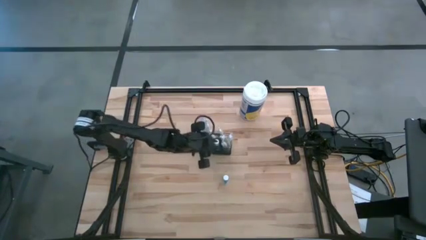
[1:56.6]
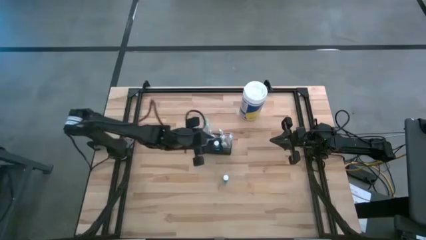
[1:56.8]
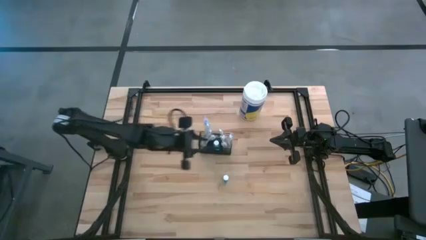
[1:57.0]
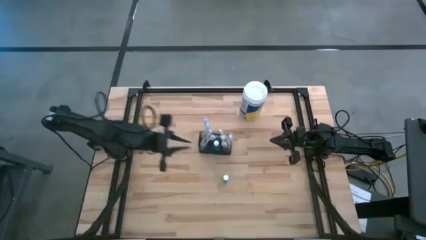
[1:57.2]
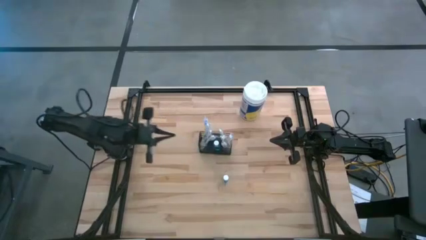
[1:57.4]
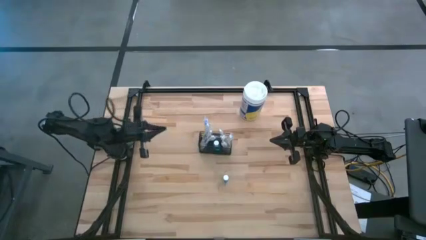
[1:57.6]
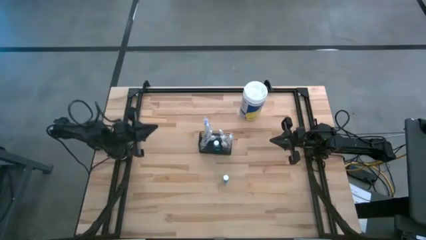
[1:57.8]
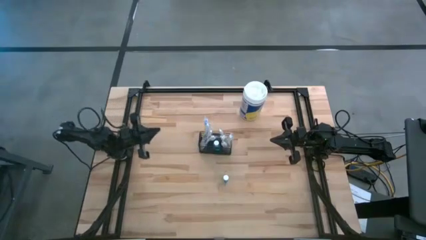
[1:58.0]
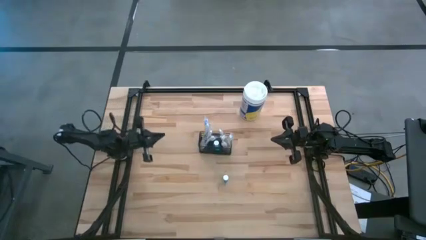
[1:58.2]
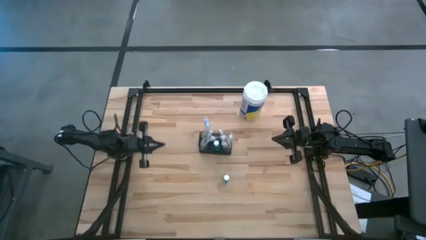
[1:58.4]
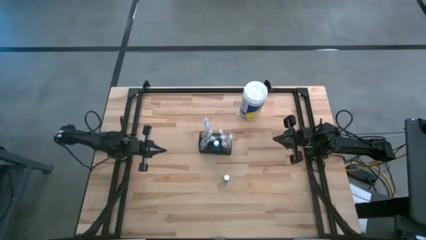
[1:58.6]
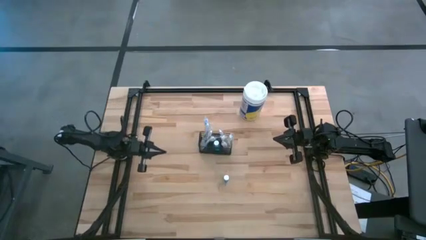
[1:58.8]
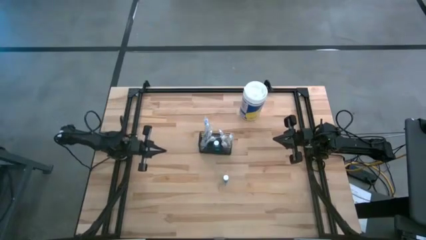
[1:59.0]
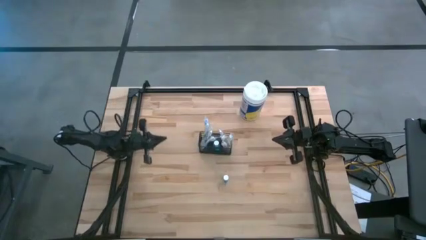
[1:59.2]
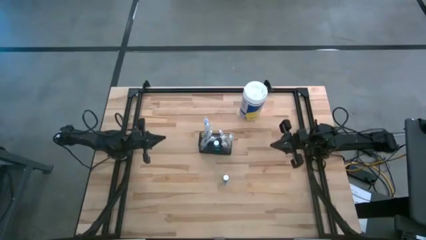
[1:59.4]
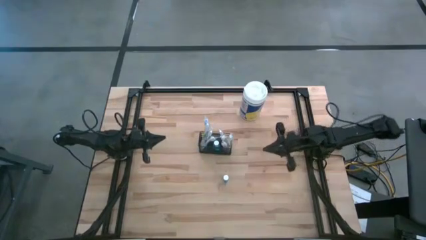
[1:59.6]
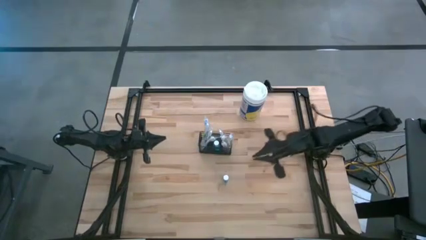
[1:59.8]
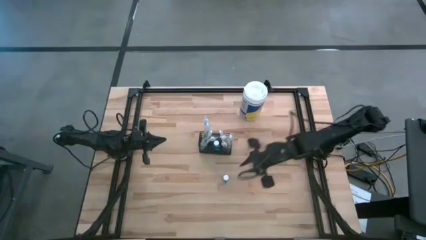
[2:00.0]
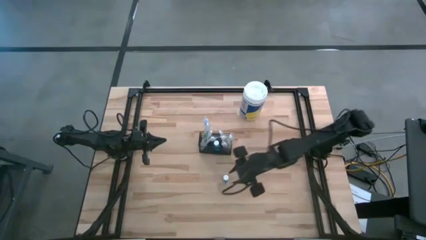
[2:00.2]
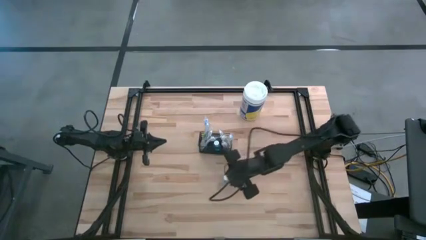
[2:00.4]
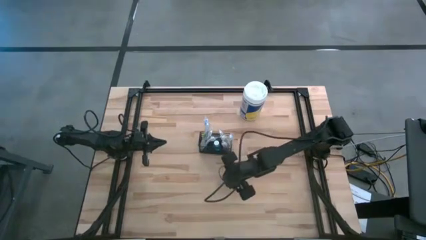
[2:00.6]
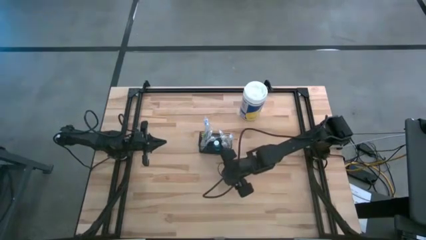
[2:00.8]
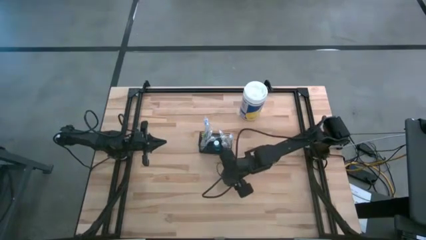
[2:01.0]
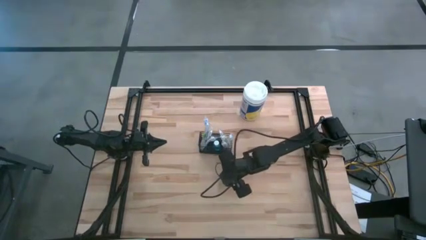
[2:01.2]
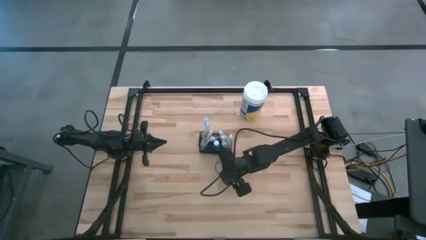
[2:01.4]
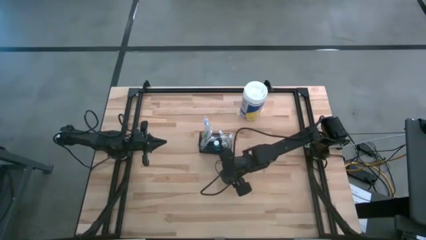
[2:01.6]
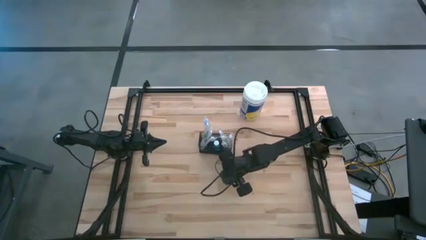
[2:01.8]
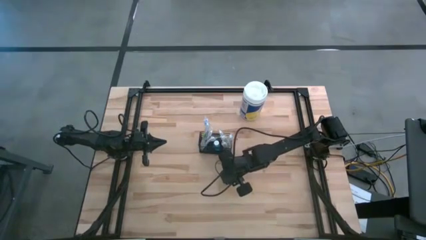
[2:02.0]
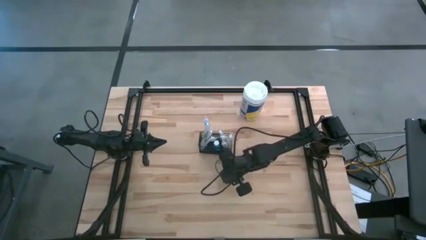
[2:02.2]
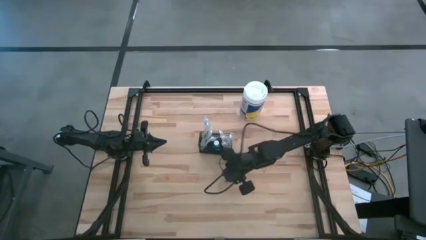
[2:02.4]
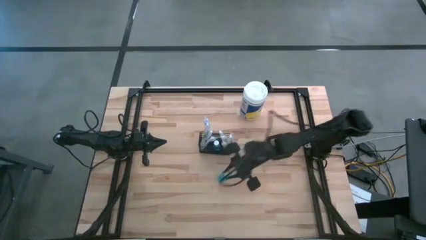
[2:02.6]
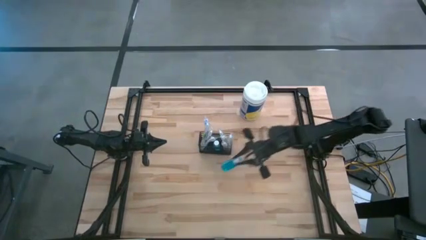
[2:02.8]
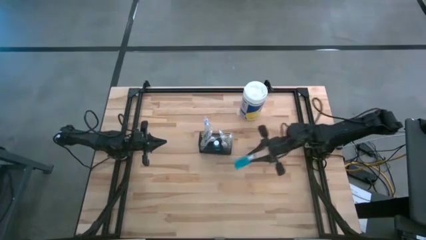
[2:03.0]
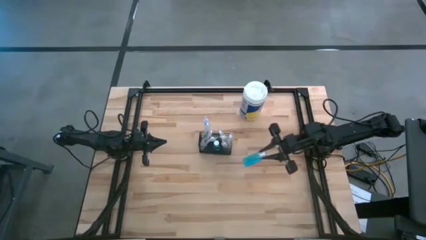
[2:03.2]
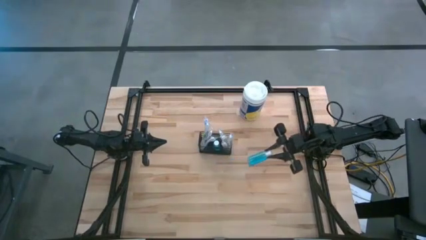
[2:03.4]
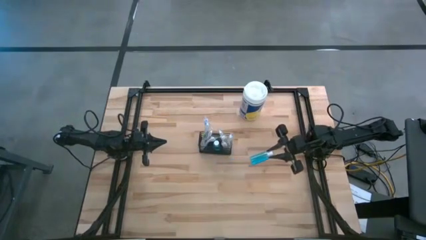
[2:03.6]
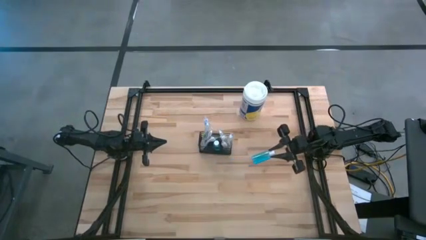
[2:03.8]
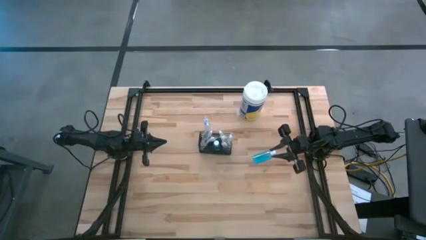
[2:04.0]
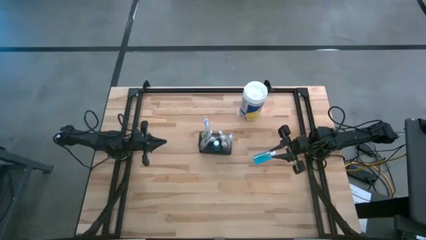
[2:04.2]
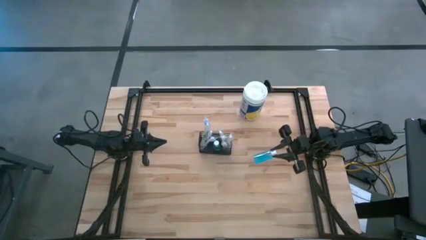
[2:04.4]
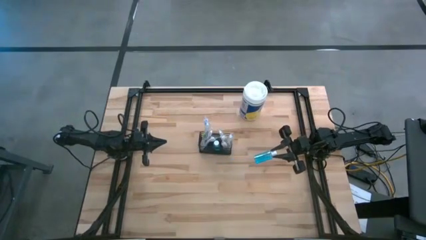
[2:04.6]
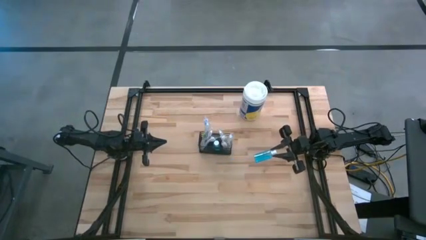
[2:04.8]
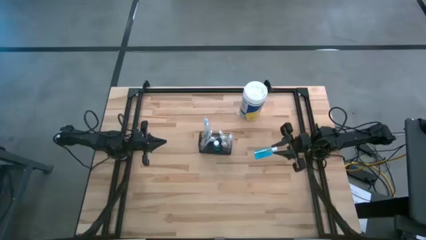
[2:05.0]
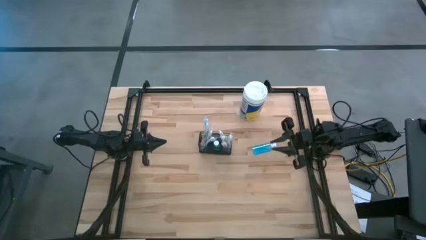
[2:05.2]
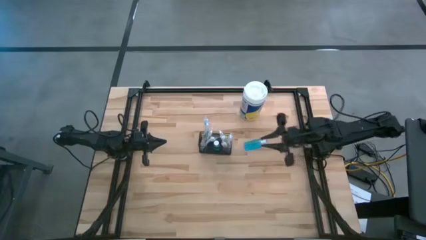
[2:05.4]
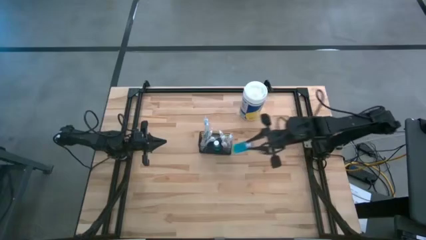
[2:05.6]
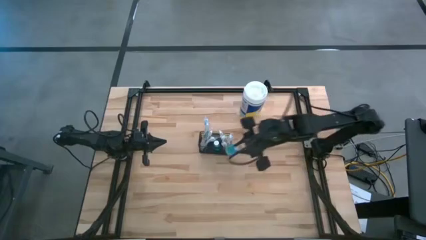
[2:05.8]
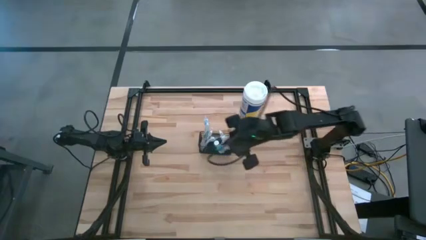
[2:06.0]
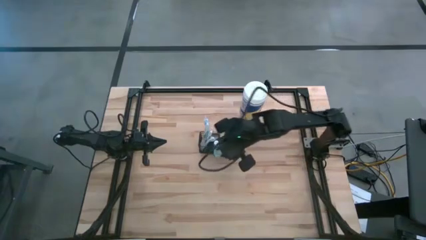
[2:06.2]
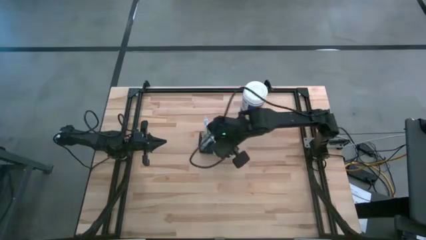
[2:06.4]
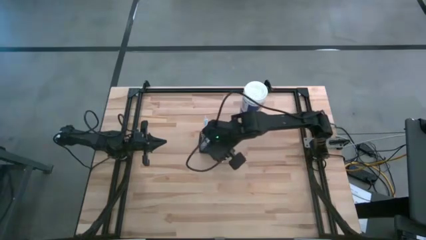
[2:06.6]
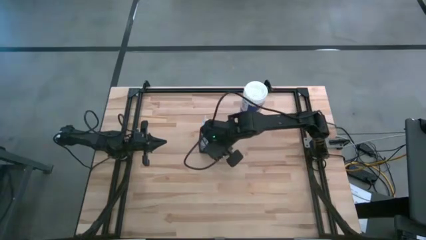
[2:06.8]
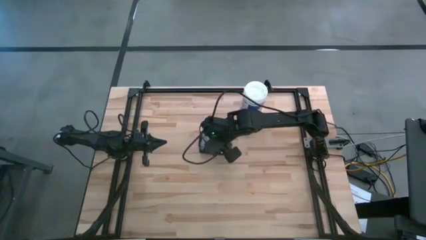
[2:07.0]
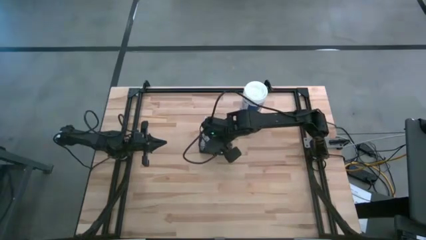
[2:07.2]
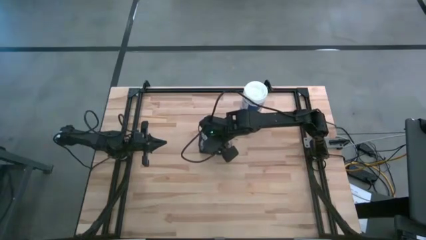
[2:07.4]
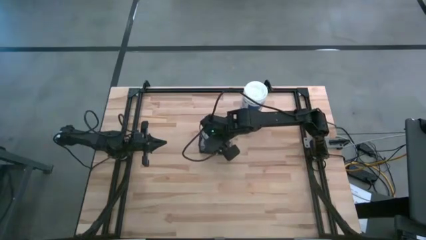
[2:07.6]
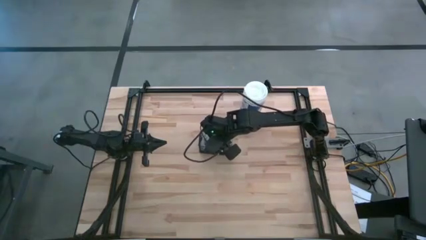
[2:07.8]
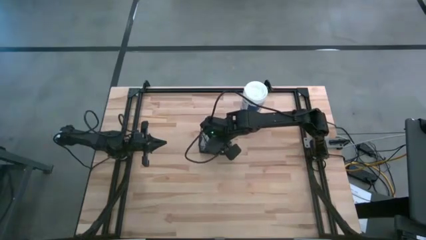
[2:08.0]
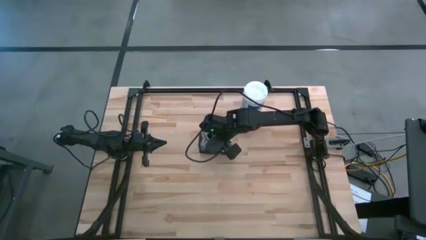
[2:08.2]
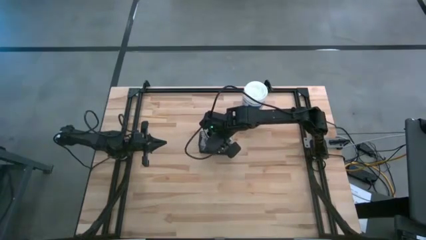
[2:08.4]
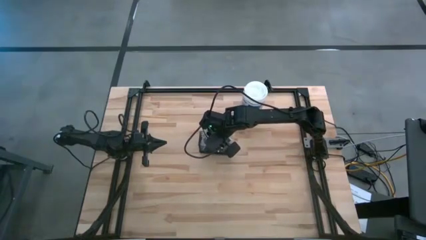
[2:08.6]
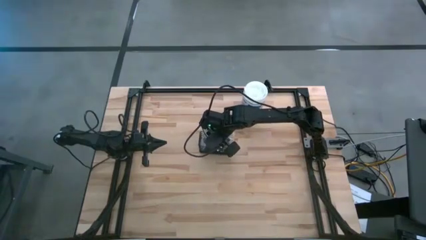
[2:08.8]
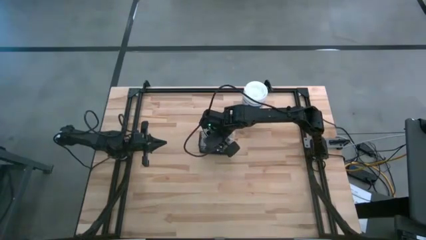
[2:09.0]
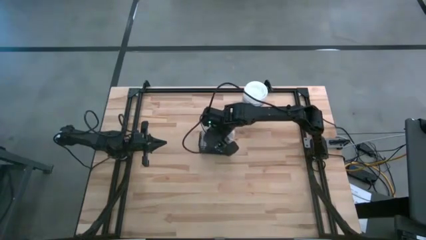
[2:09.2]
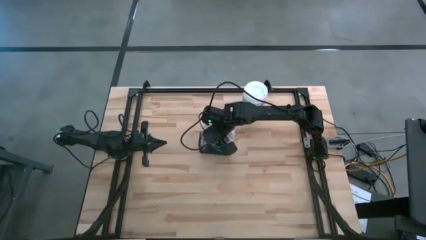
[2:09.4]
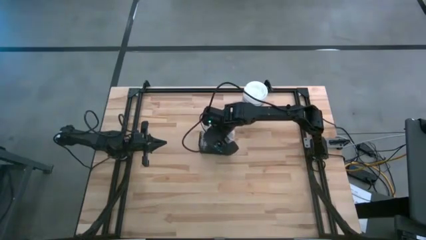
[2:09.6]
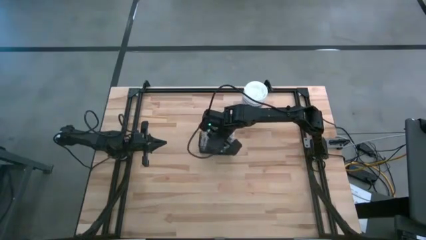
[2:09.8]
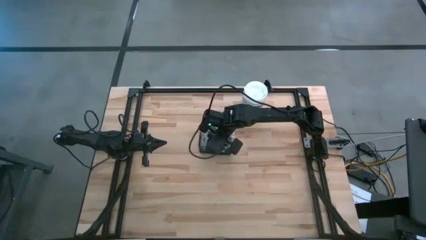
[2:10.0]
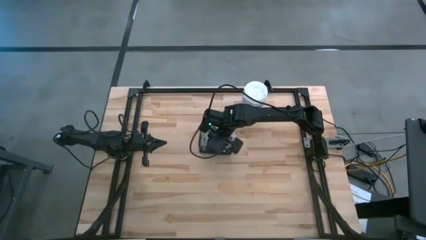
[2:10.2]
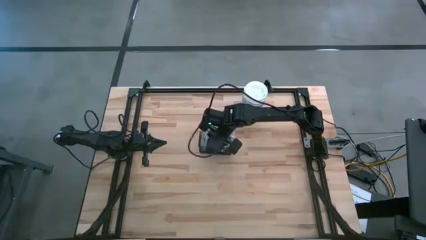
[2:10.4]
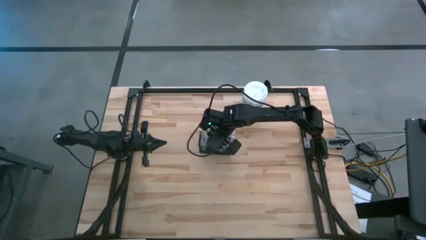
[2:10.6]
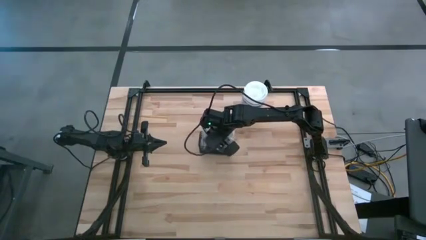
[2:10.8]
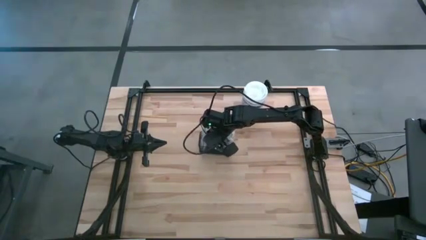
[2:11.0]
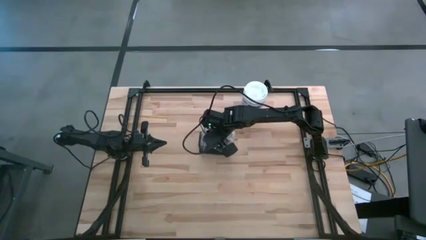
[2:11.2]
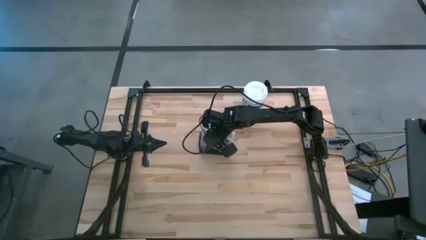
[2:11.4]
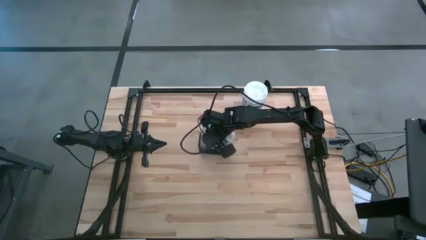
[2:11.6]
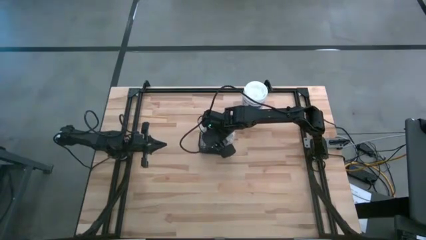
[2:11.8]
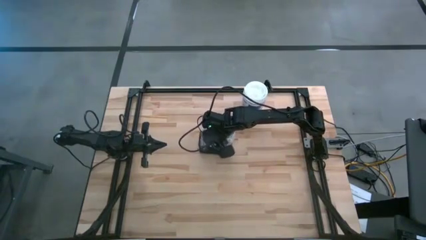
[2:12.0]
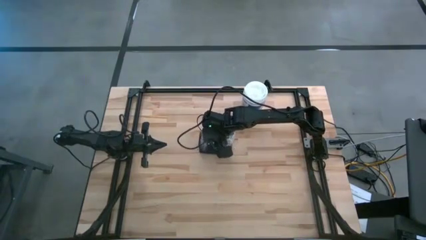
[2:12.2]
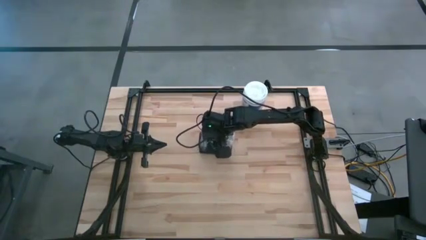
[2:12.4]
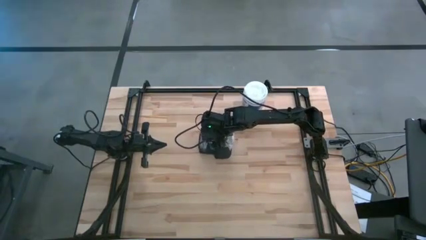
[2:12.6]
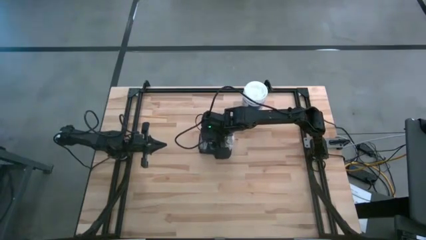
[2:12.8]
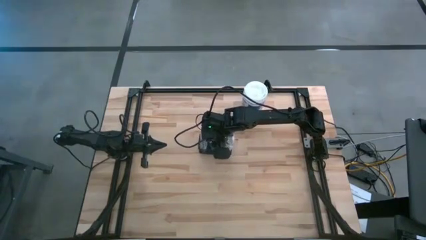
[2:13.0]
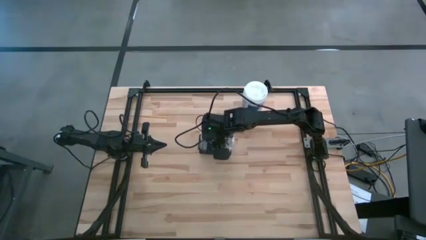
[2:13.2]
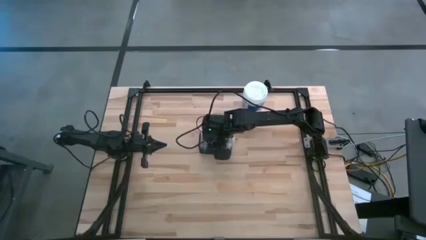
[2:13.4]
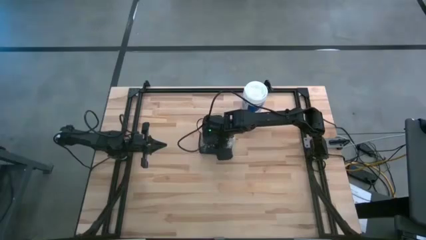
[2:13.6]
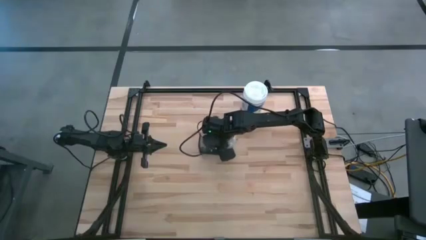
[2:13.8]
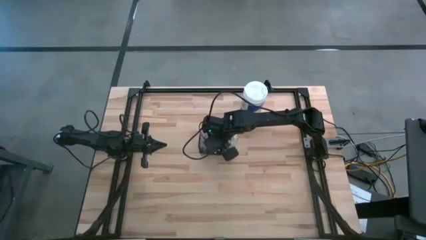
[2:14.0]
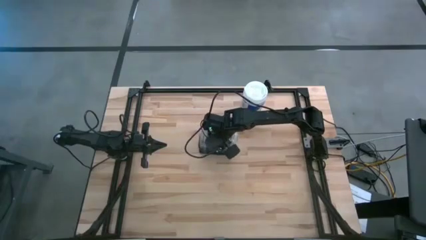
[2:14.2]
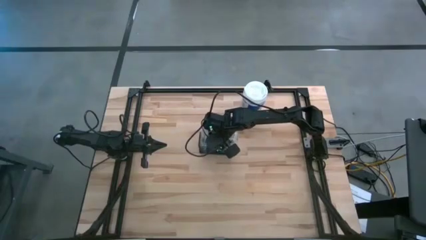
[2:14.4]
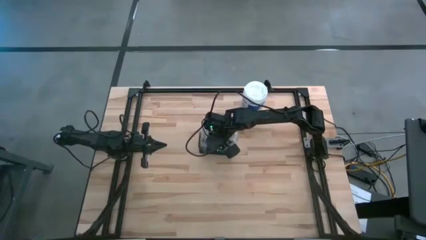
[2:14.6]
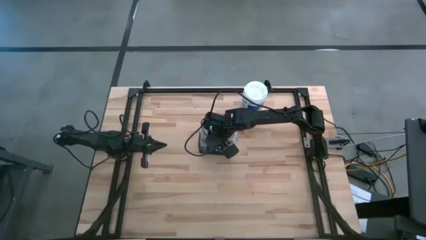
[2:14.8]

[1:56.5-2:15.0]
Task: Pick & Place toothbrushing station
Put the mouthwash into the black wire organizer
